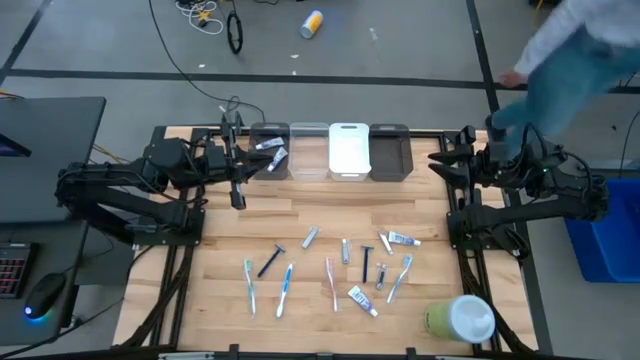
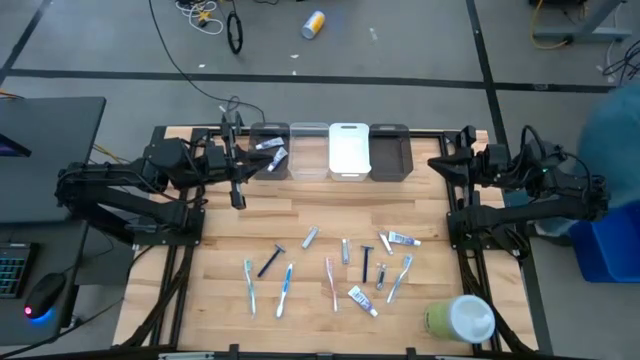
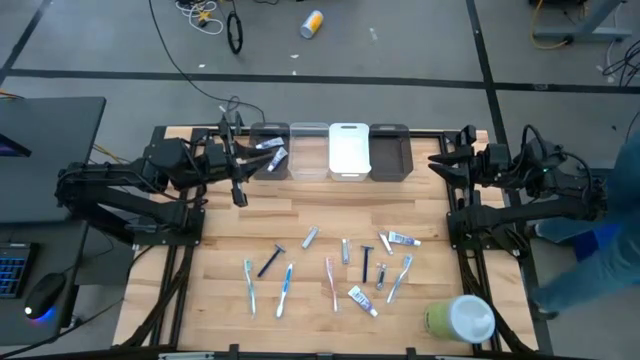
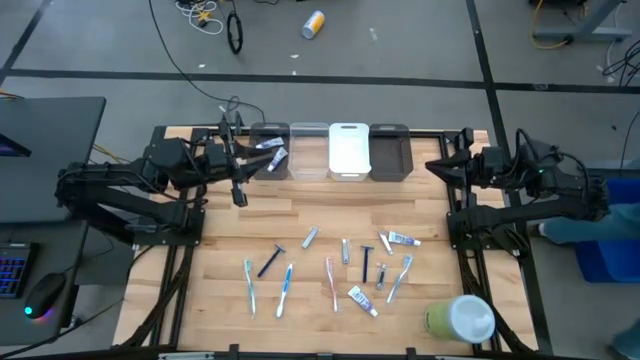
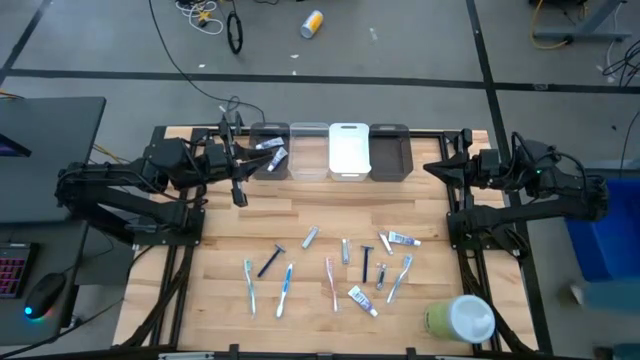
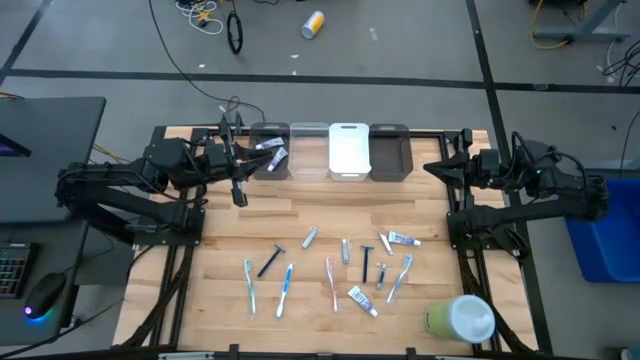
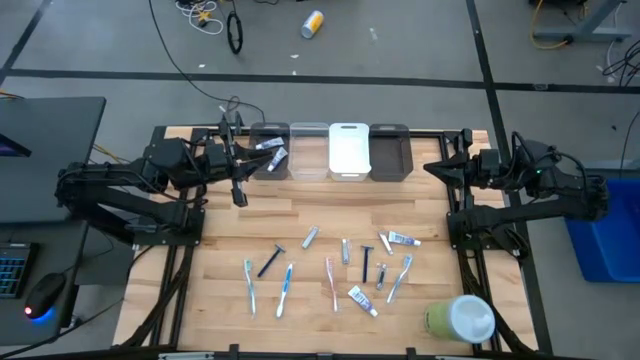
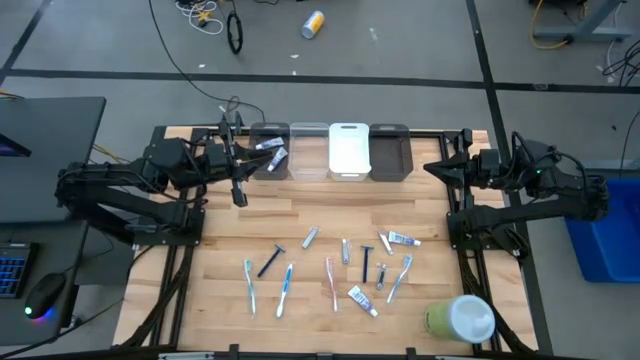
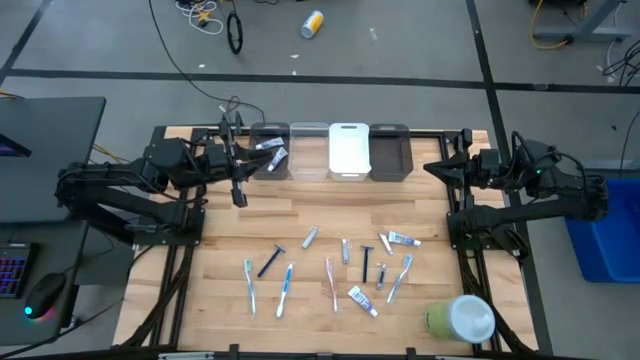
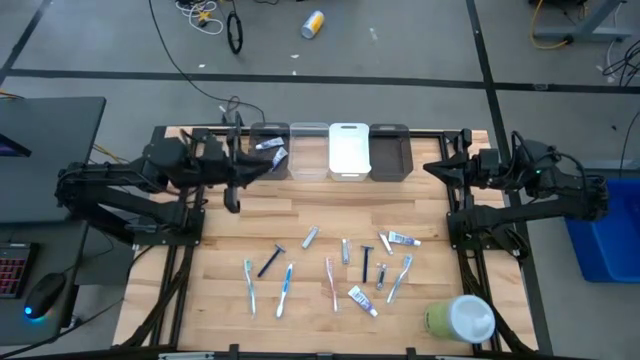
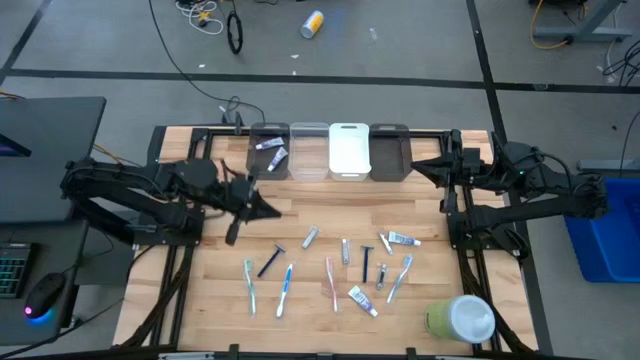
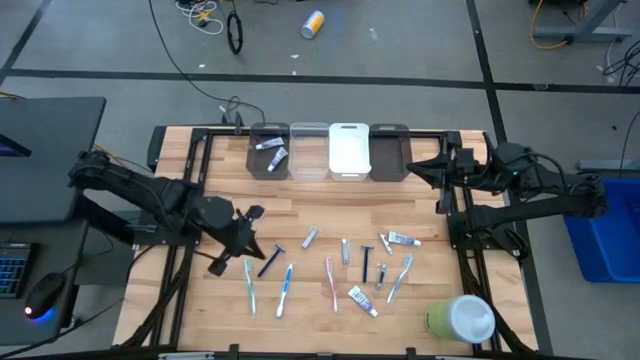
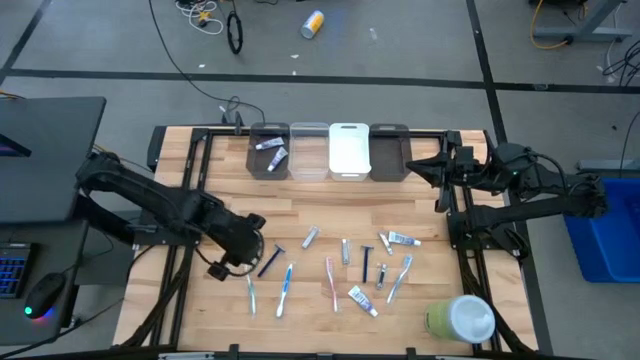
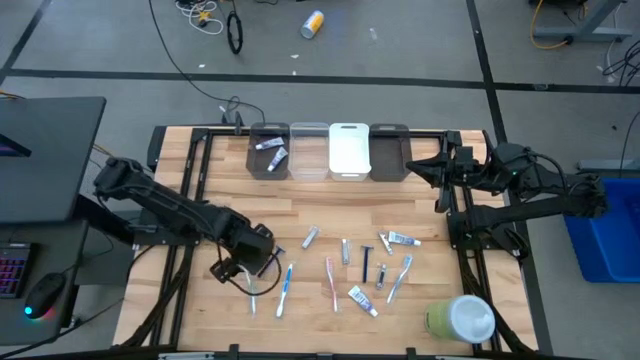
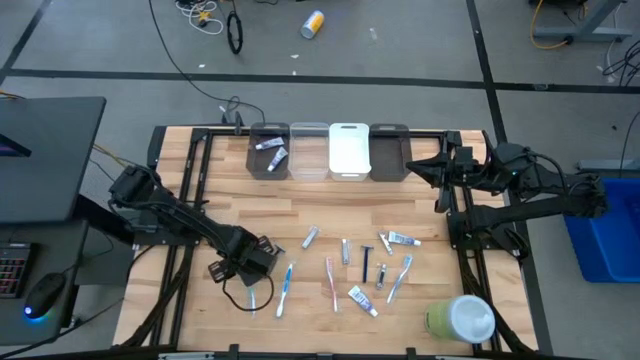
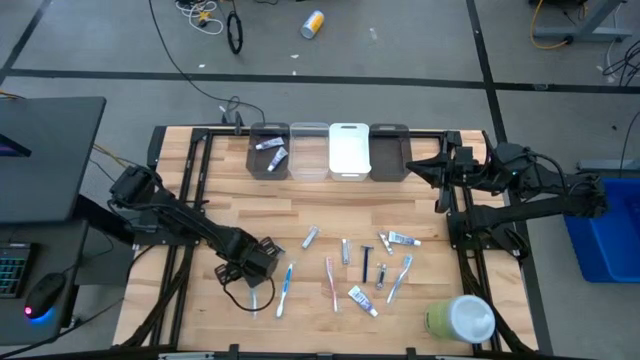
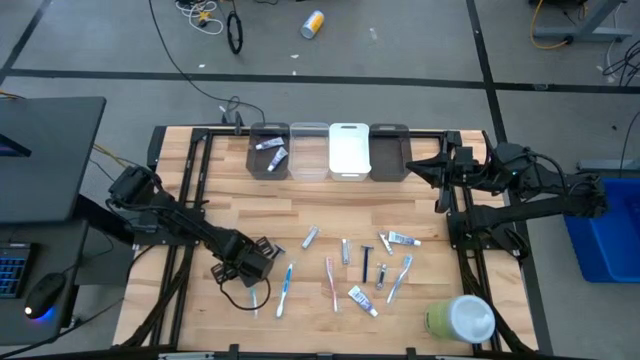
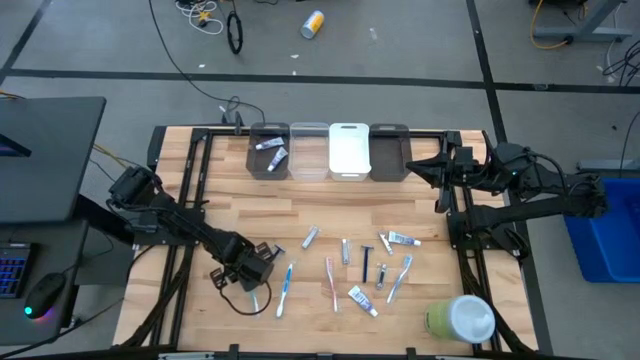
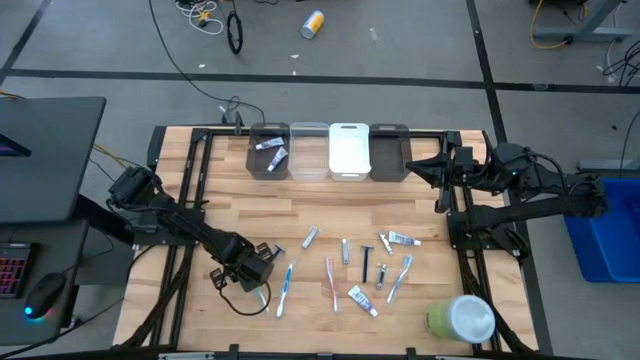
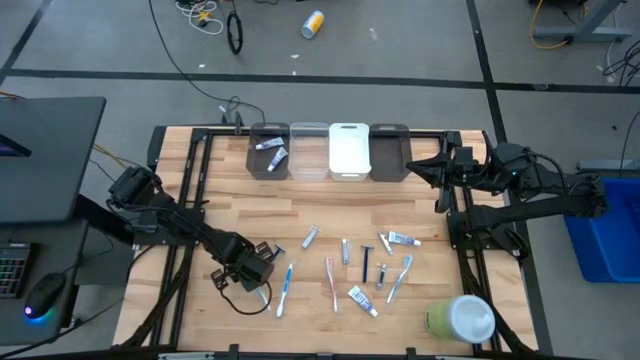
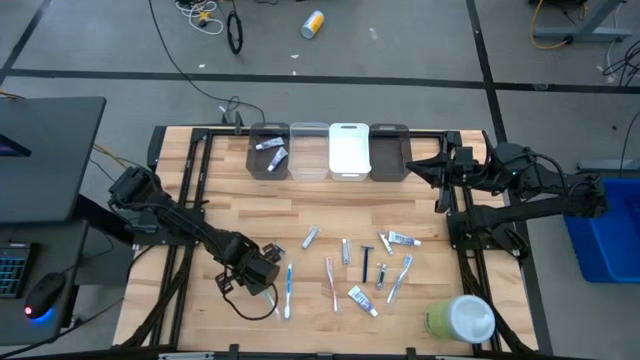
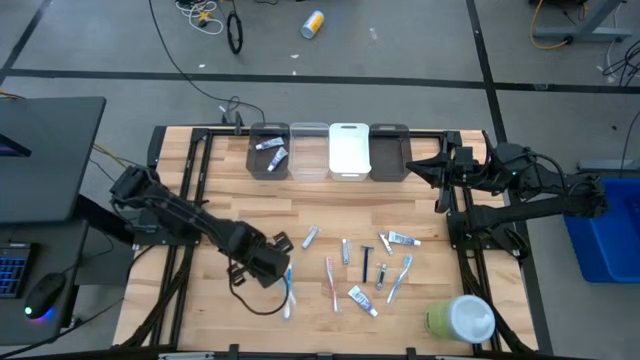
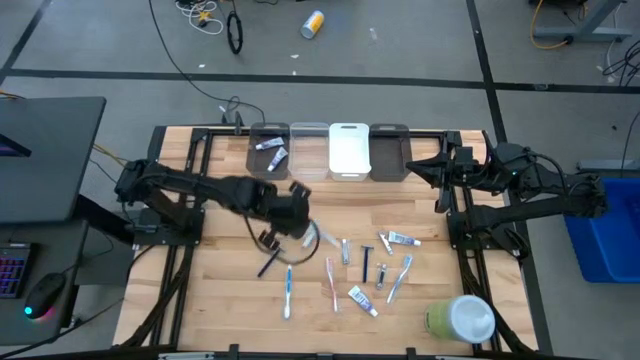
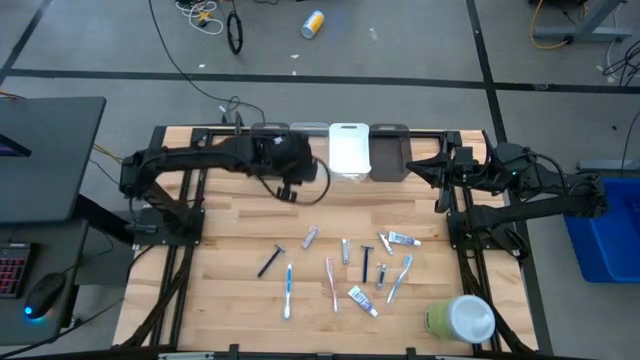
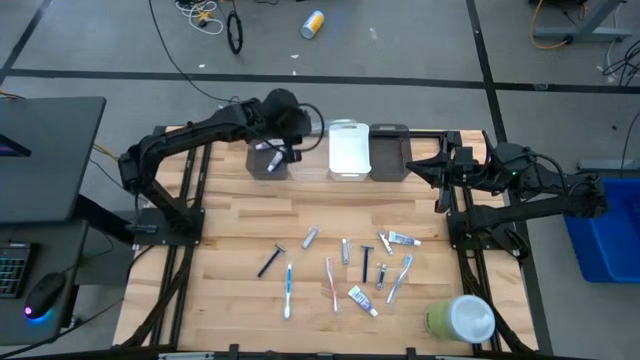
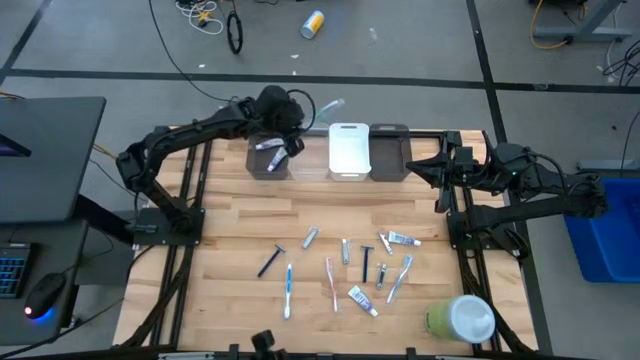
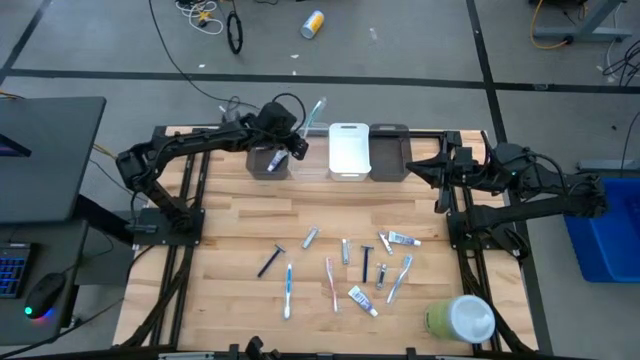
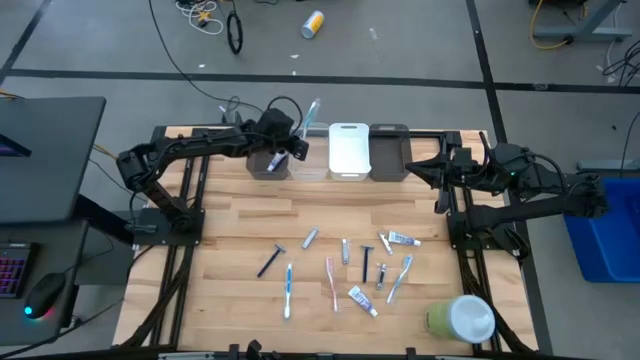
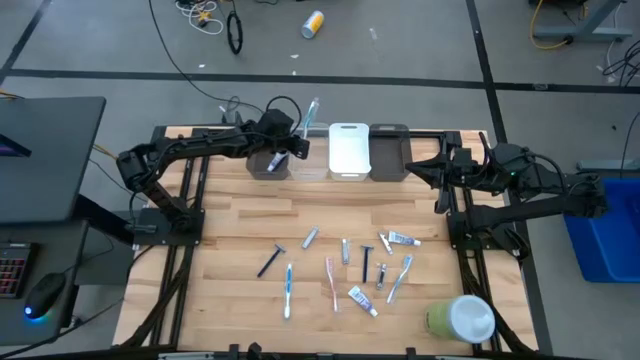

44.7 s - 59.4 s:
Task: Pick & Place Travel size toiletries
Put the green toothbrush into the transparent bin
